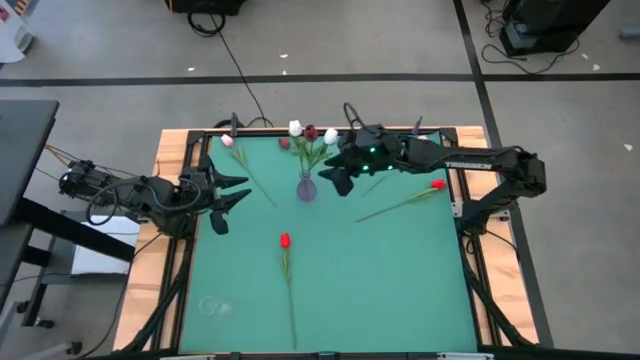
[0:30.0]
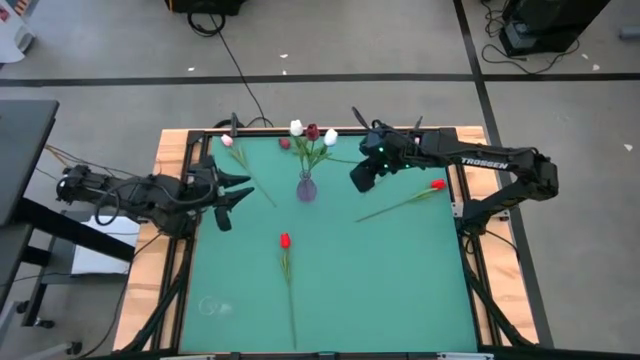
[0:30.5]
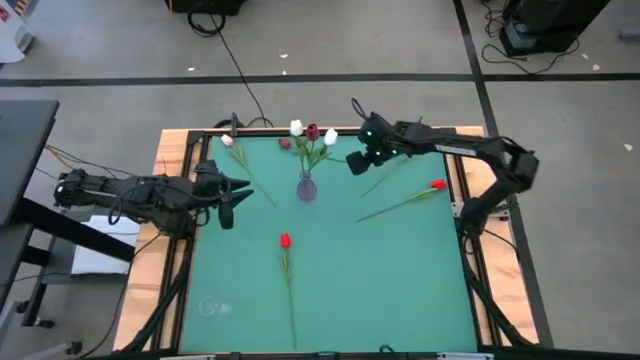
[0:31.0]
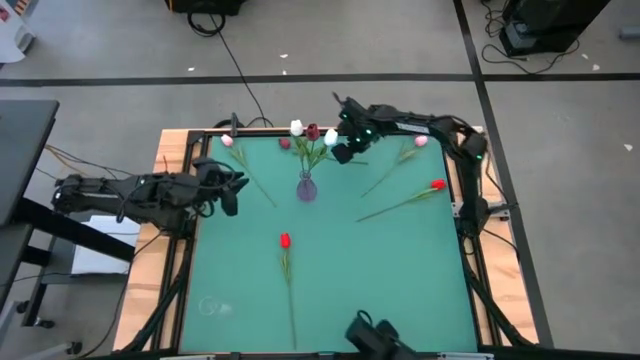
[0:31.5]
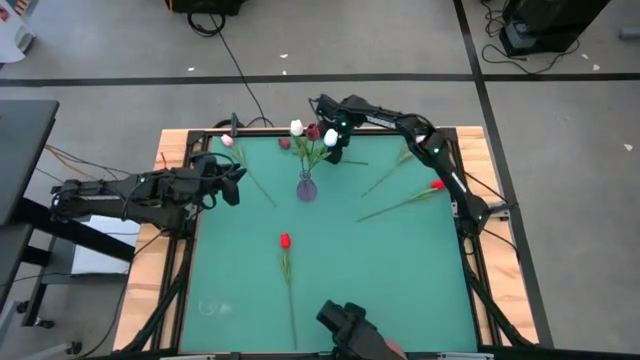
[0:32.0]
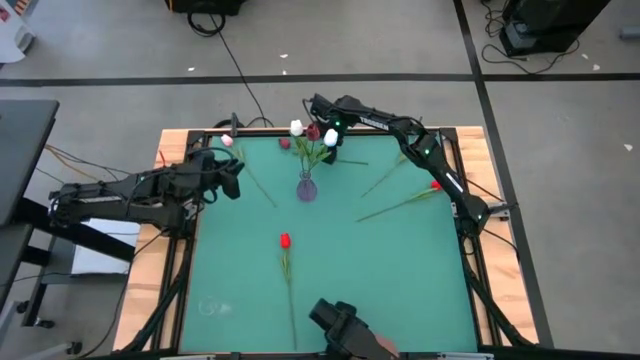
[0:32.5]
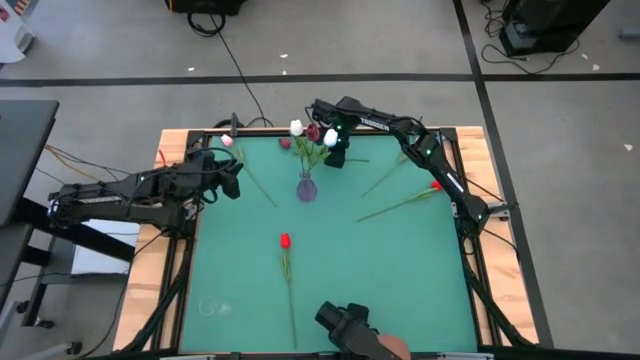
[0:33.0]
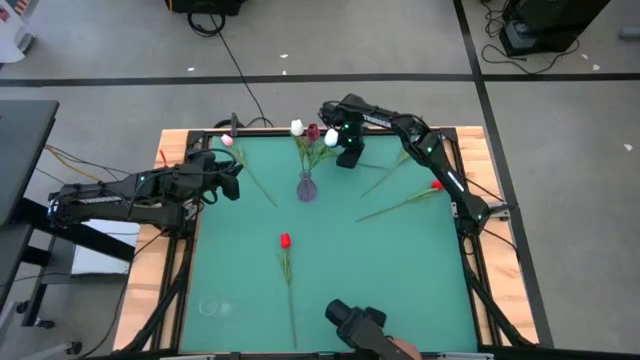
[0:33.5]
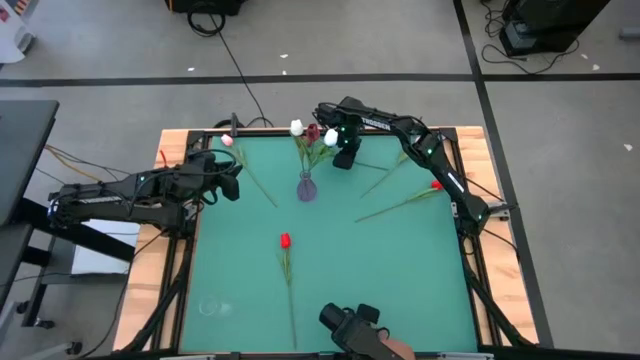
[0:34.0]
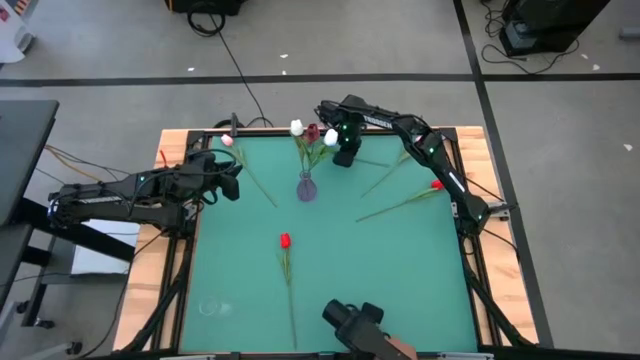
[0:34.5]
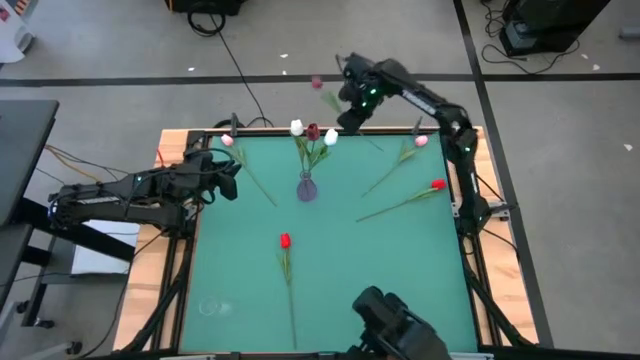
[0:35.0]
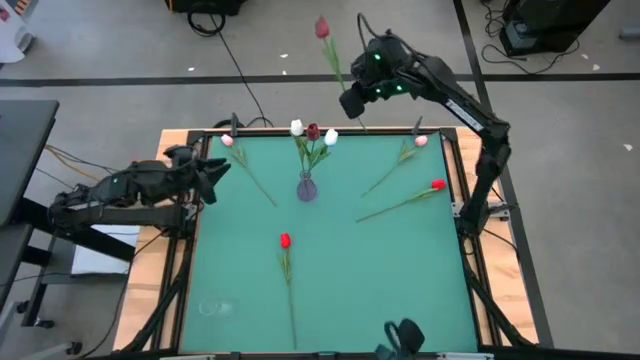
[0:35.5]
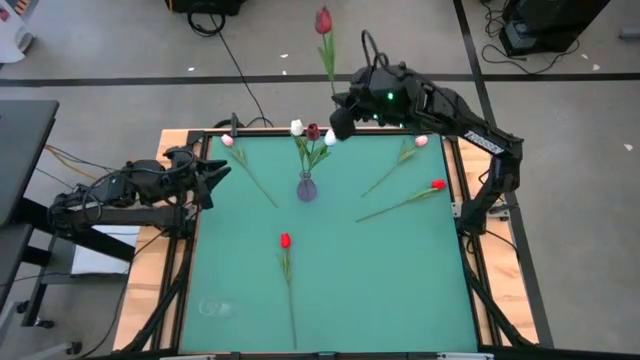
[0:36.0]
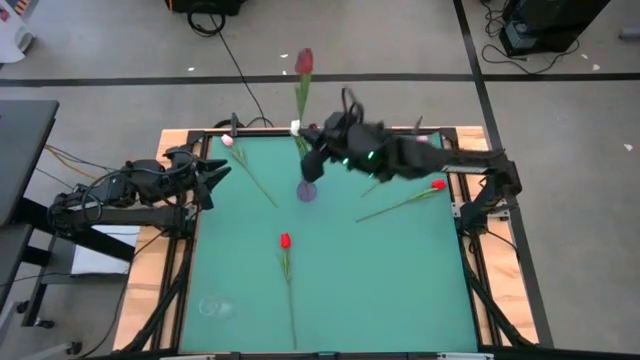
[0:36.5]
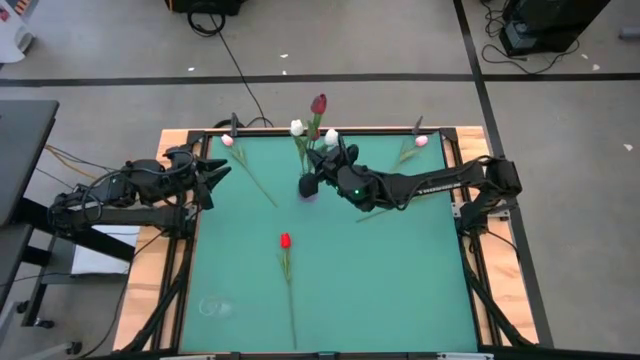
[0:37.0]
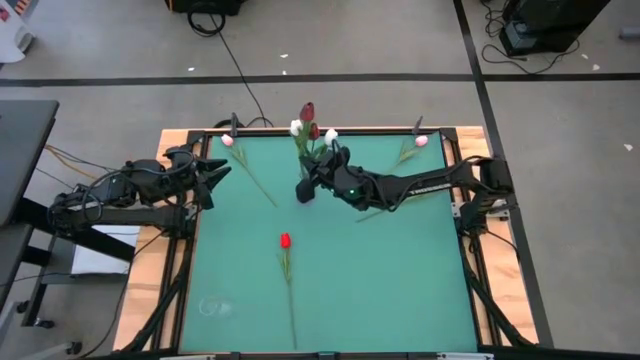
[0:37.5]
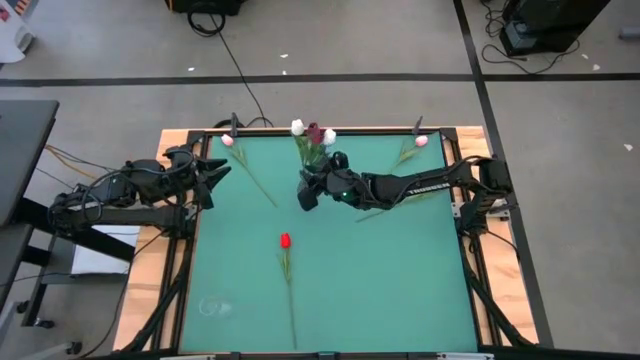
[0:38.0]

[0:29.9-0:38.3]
Task: Sort flowers into vase by color
Put the dark red tulip into the purple vase

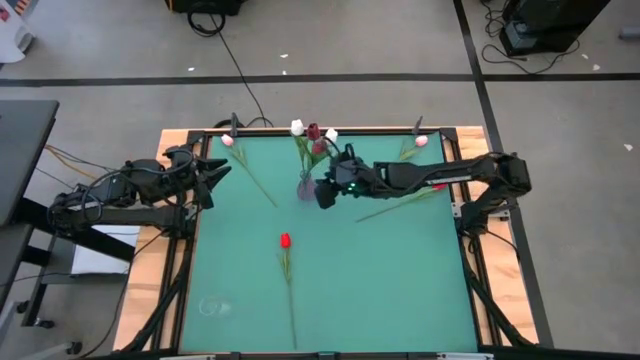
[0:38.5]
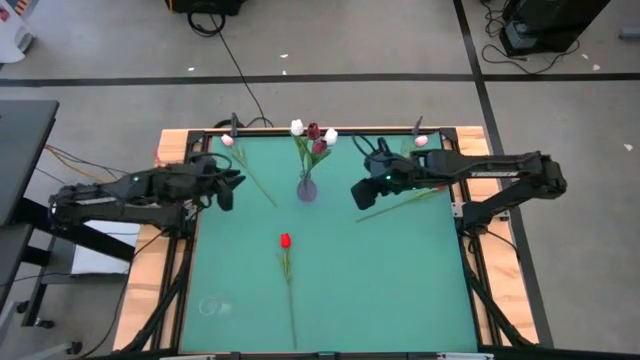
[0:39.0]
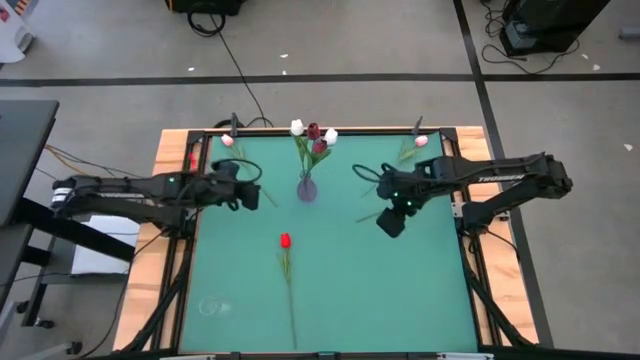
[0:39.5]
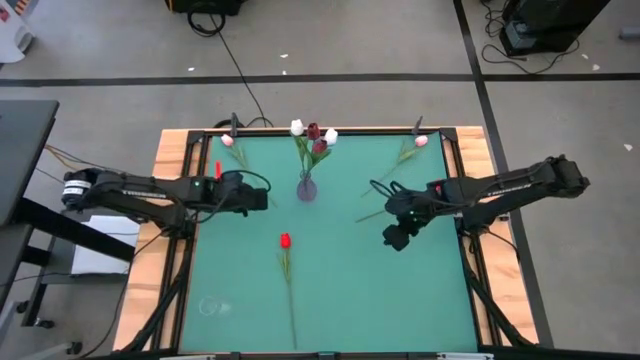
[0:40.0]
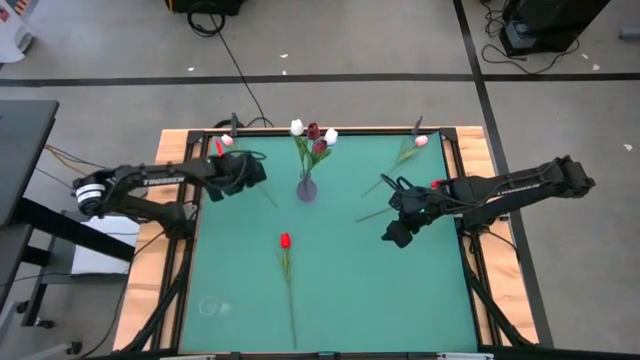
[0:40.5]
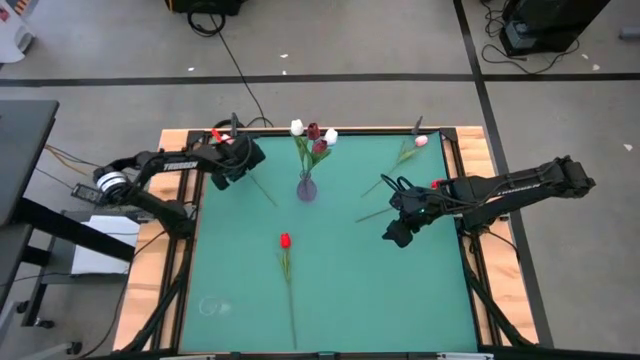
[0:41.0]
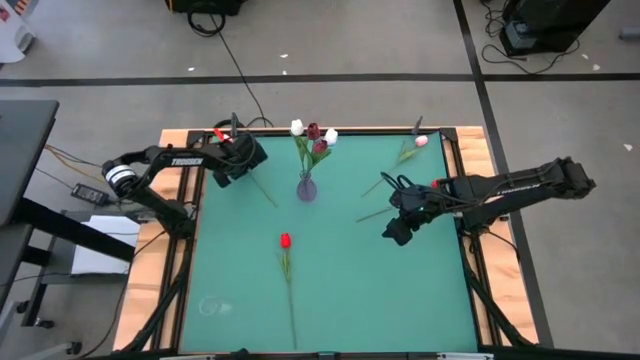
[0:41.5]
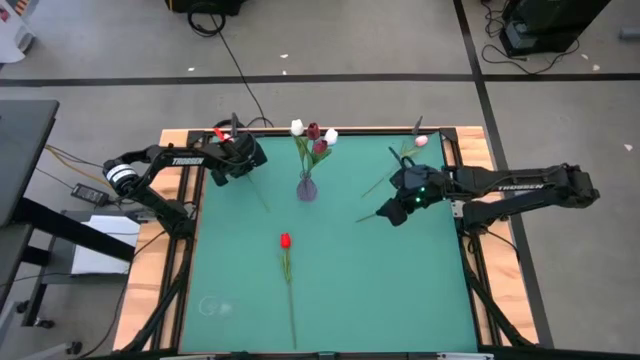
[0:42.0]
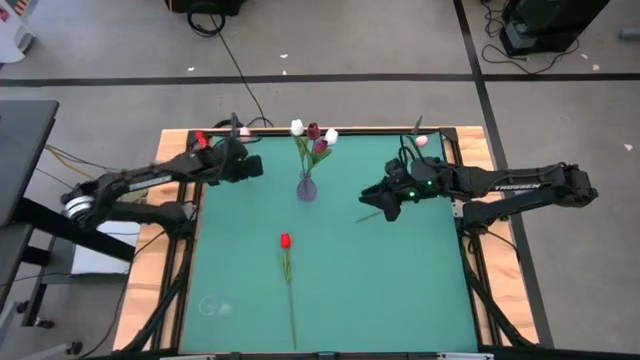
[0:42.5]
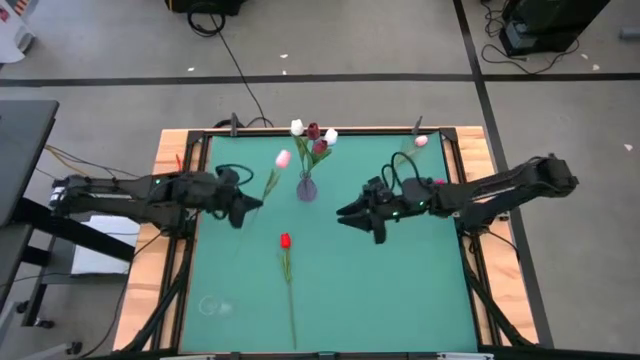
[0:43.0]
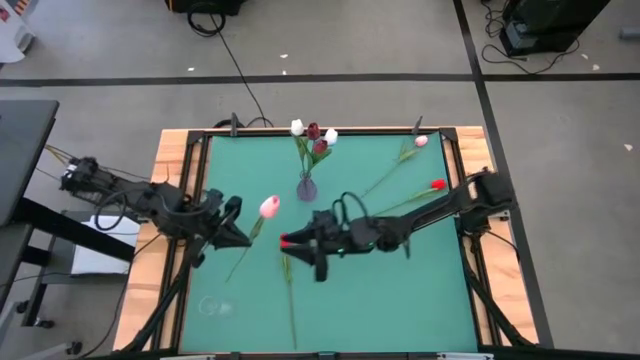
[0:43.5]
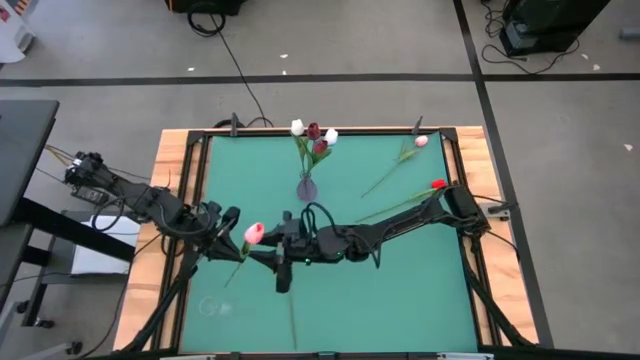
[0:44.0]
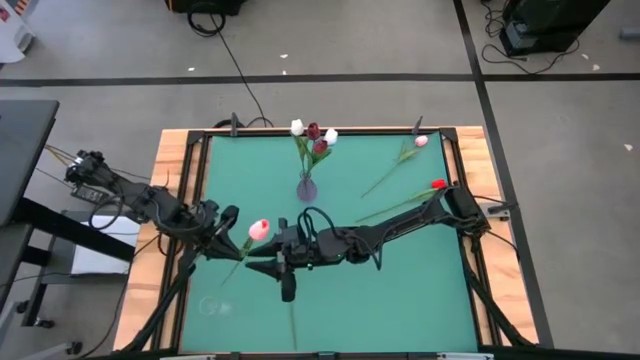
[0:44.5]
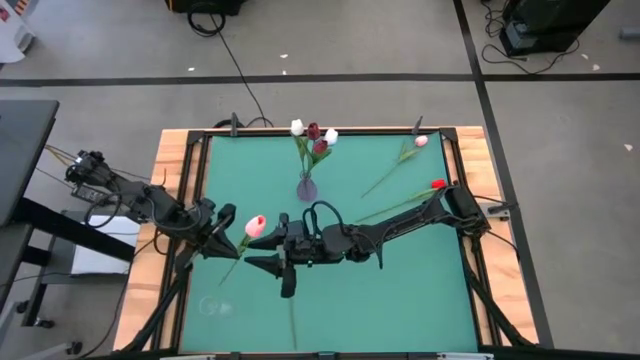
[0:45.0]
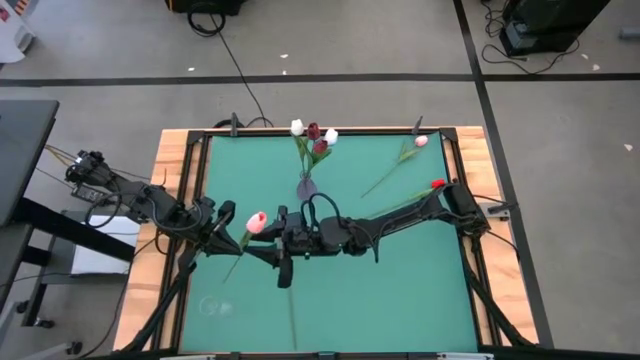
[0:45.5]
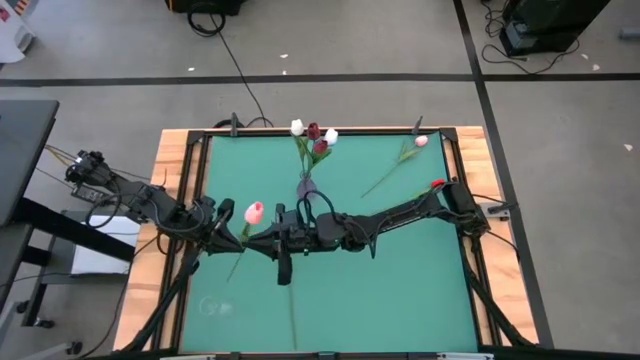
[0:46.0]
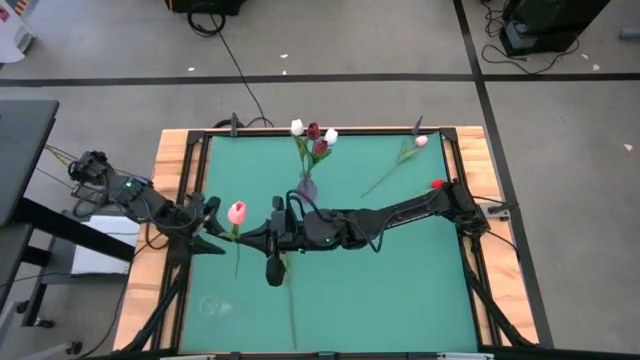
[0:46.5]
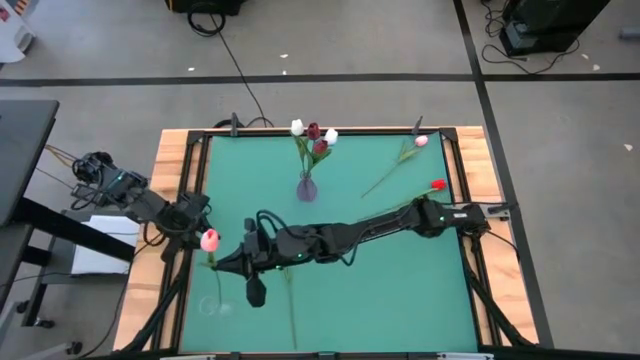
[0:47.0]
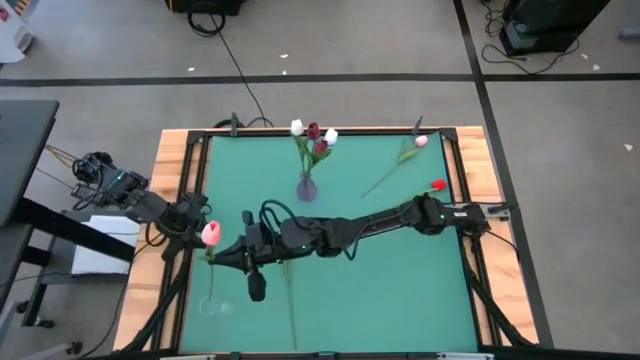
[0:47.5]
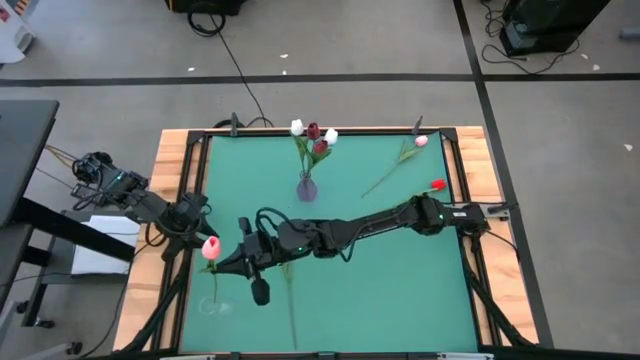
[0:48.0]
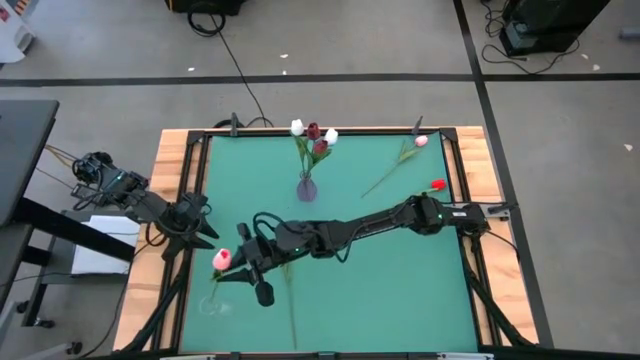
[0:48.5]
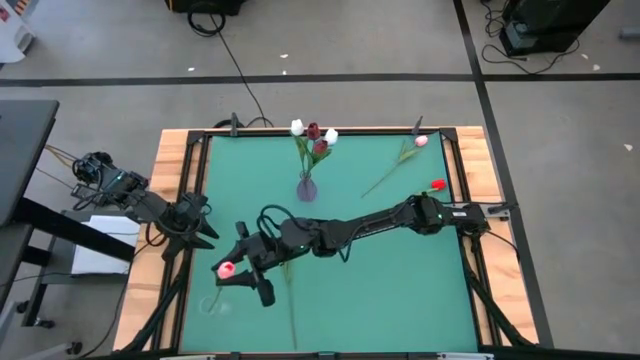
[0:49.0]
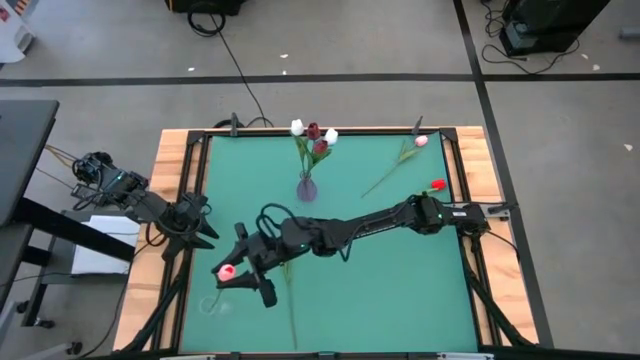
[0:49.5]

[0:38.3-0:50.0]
Put the left pink tulip into the transparent vase

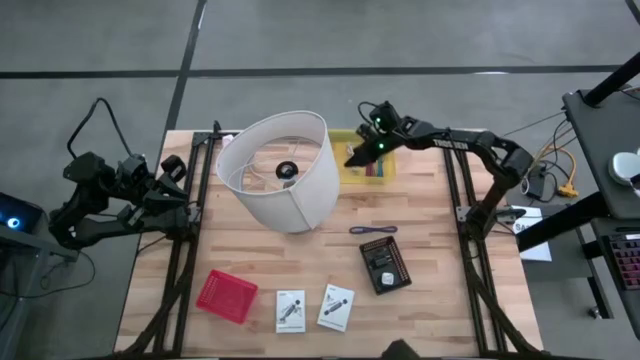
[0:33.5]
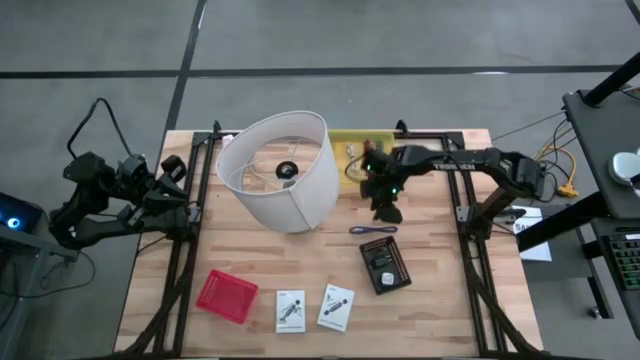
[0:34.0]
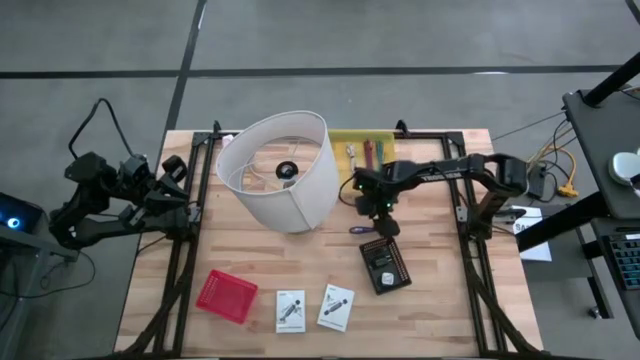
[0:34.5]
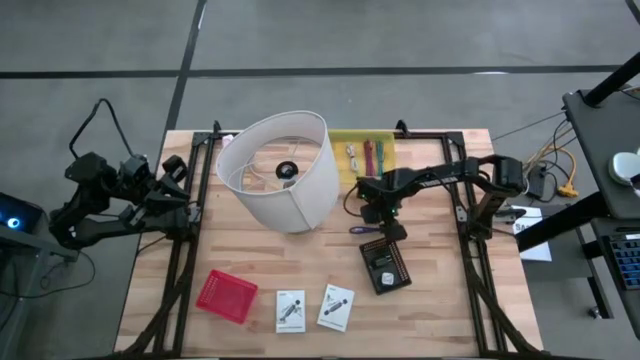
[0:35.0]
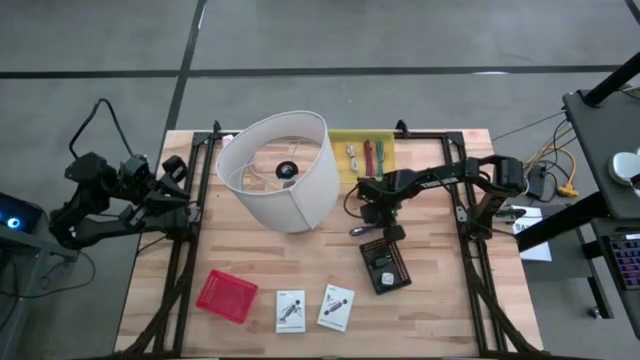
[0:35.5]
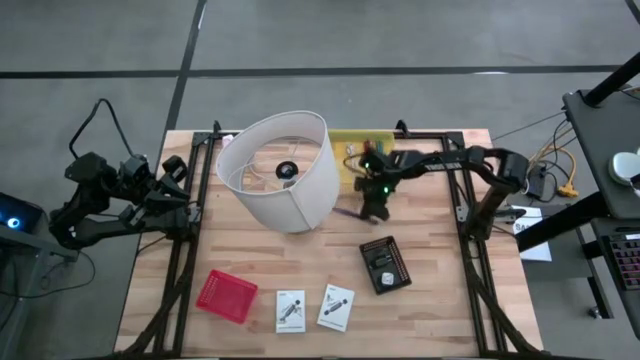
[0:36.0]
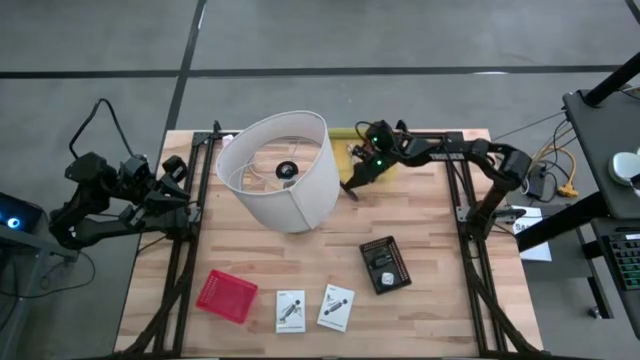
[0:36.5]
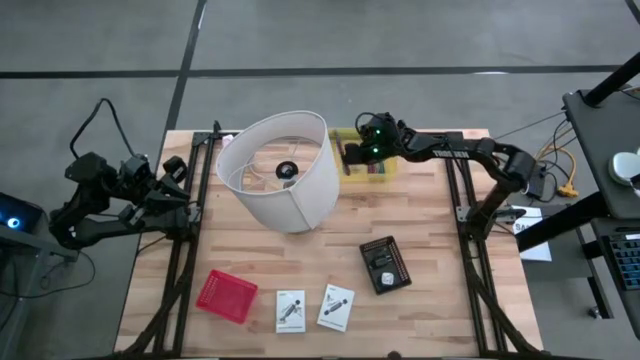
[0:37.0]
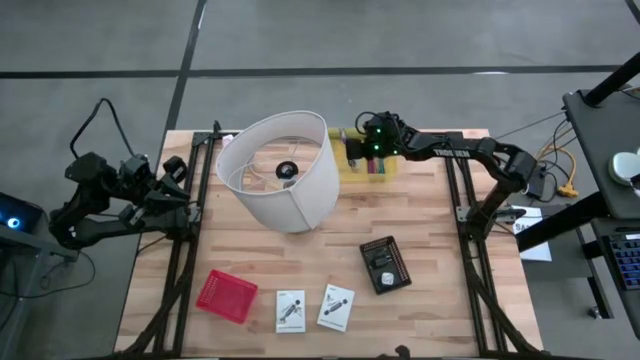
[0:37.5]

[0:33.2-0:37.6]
Task: Pick and place items into bin
Put the blue cable into the yellow bin
